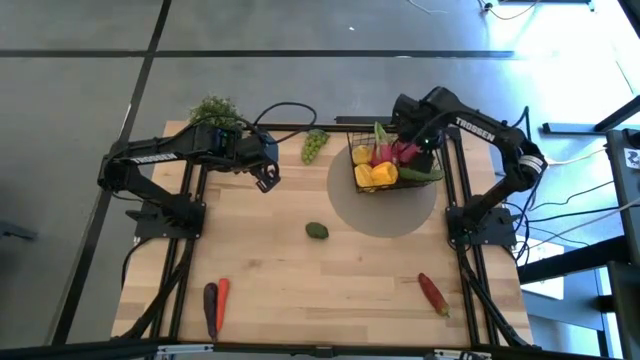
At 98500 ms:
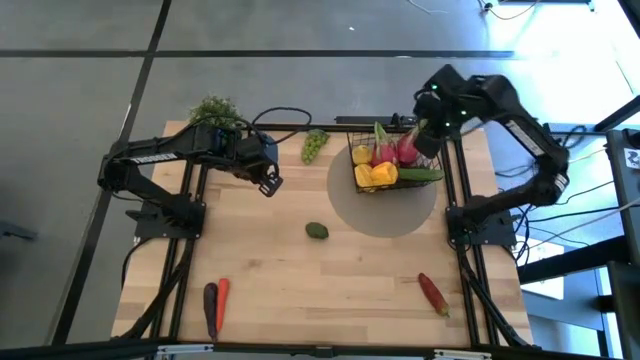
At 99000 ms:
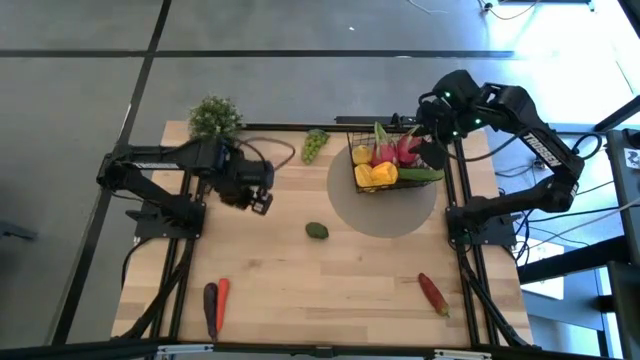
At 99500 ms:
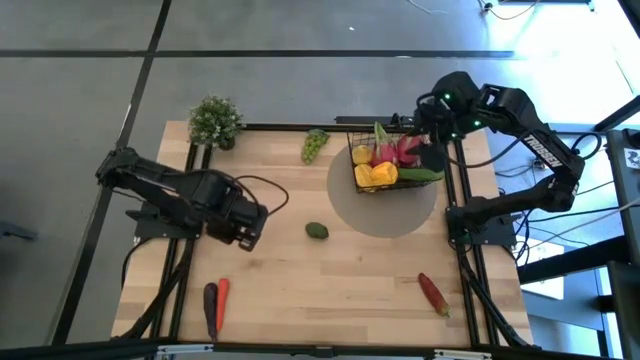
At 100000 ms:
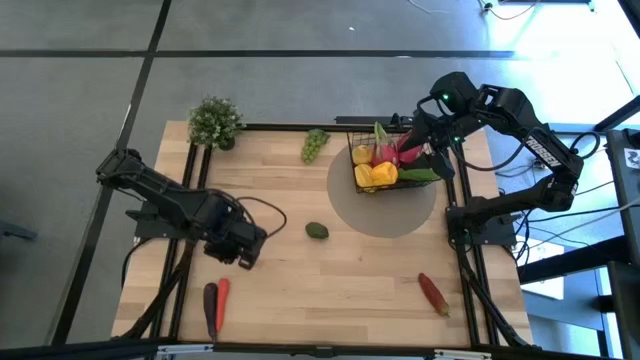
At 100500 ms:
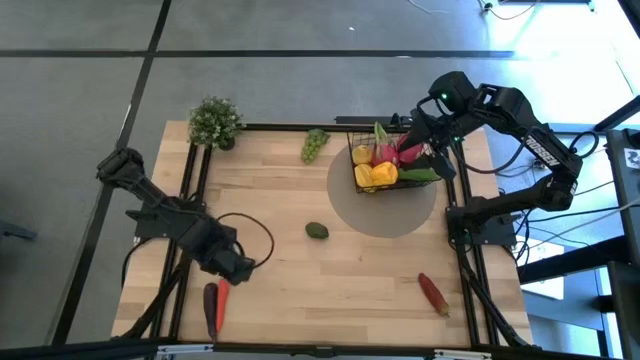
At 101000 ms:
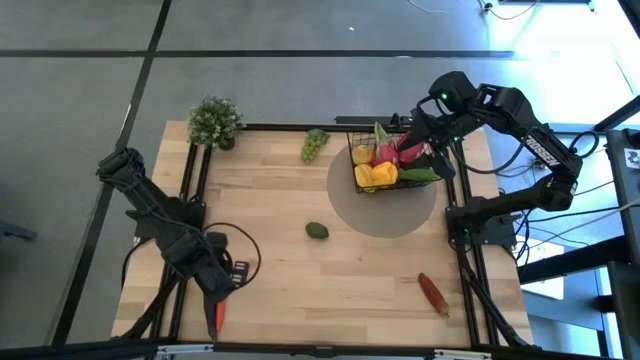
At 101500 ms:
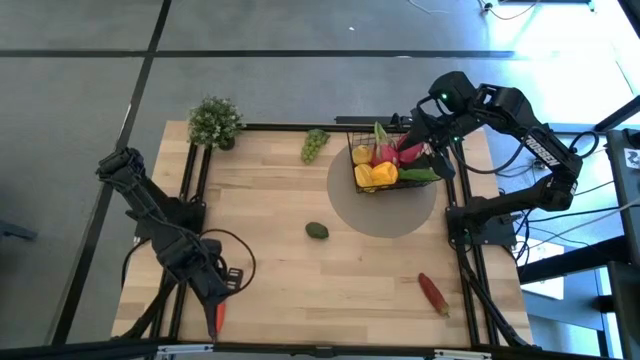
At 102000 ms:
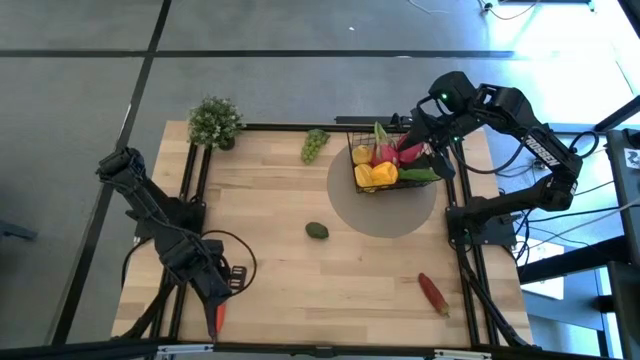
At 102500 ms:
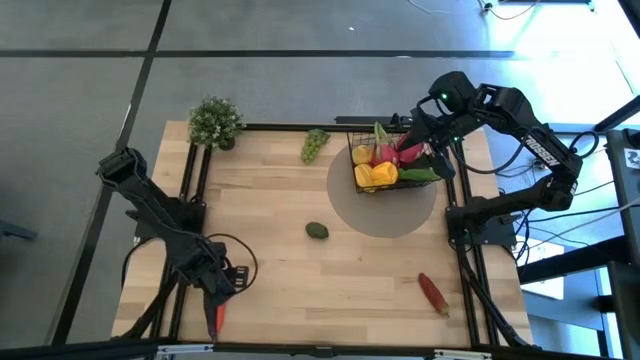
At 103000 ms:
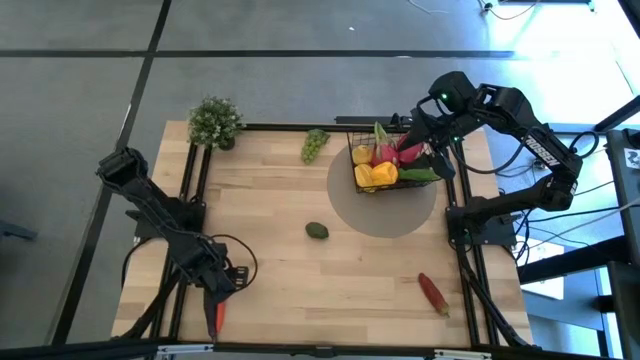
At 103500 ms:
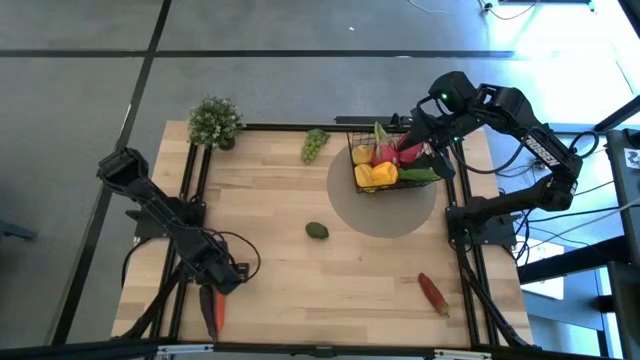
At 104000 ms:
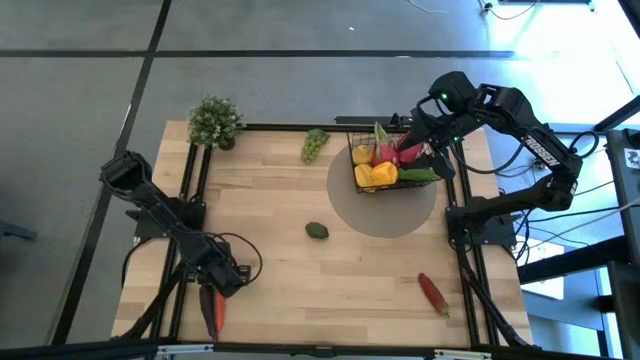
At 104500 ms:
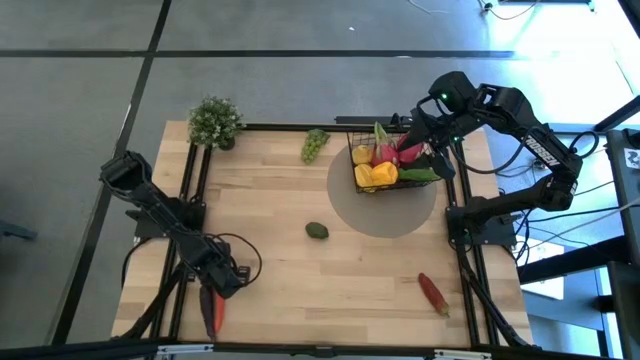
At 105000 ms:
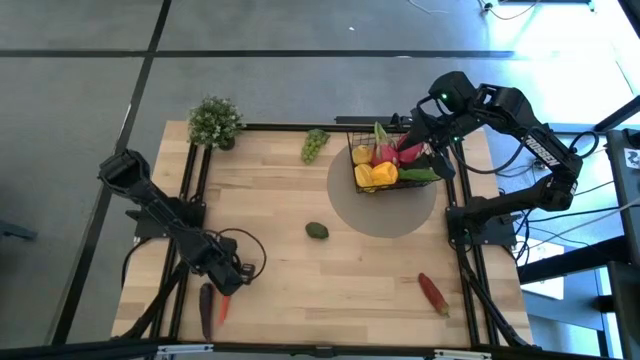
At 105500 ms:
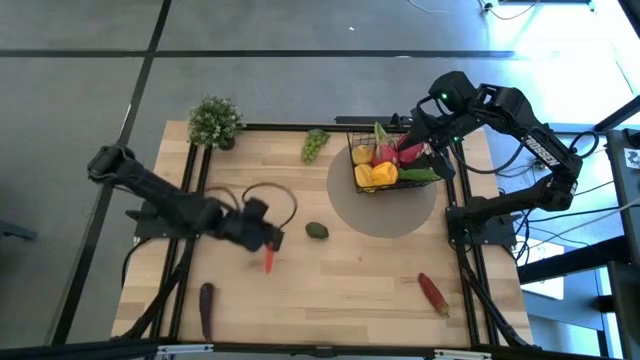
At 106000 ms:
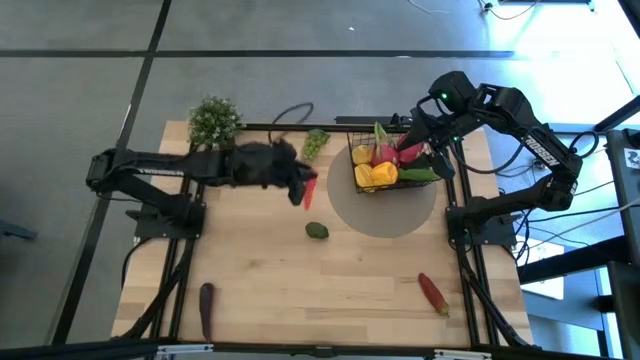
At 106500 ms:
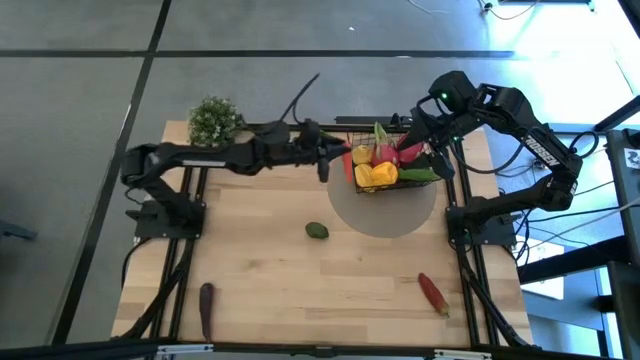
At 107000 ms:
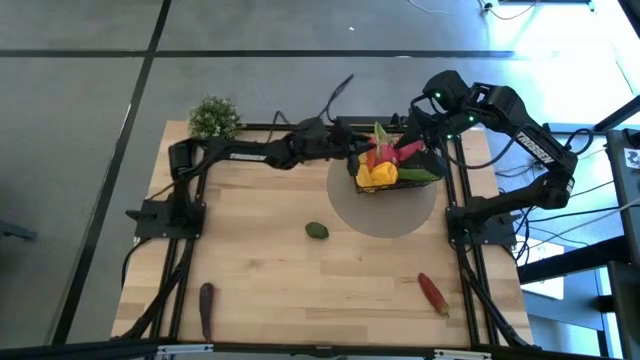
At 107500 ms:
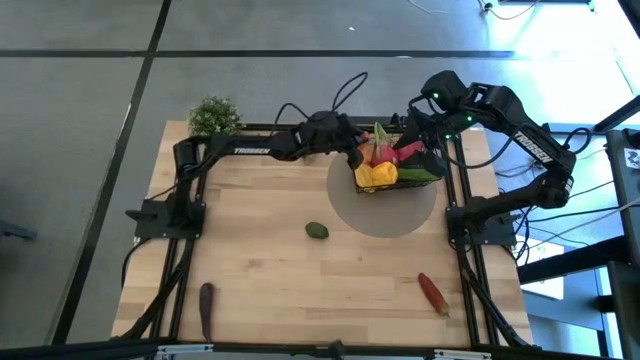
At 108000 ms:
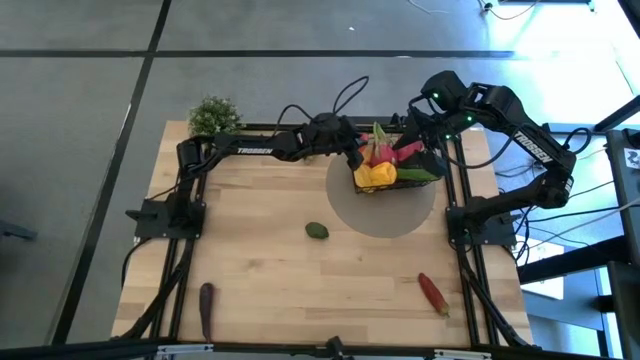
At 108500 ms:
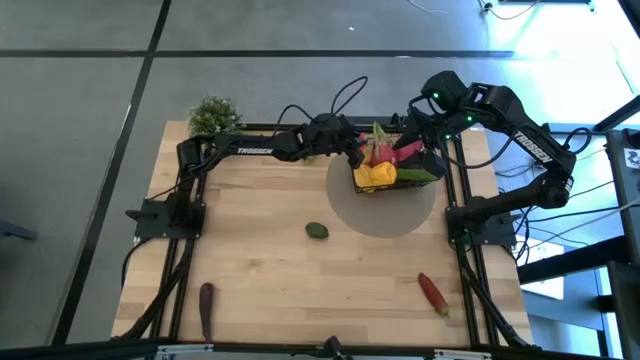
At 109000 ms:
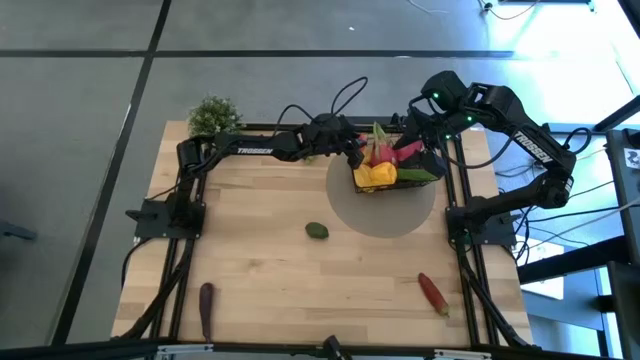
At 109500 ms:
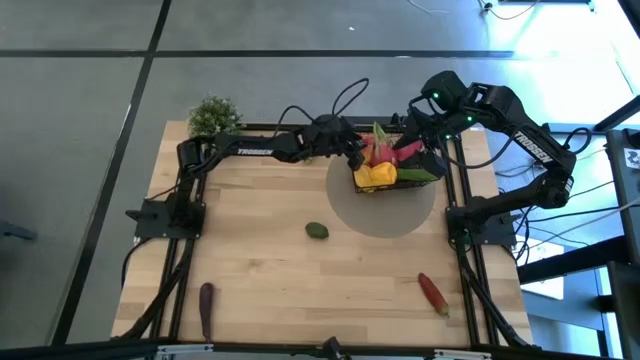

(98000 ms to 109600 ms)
Task: Build produce basket
Put the carrot into the wire basket

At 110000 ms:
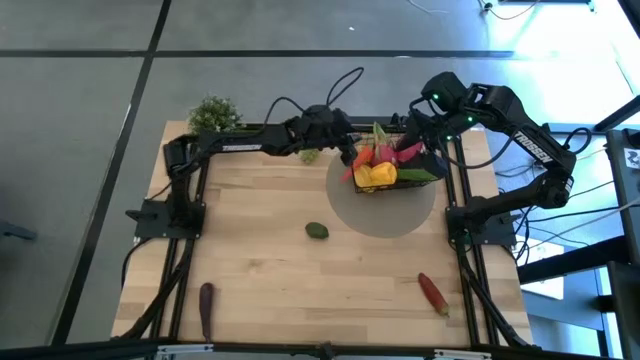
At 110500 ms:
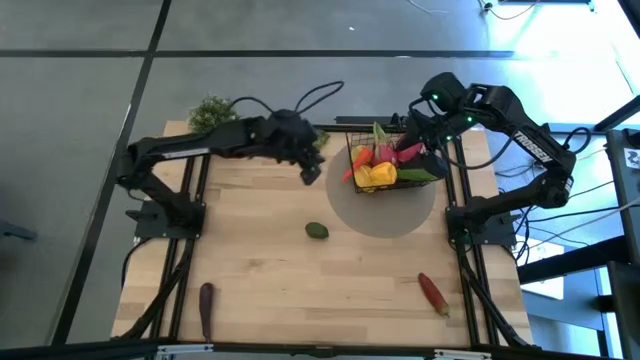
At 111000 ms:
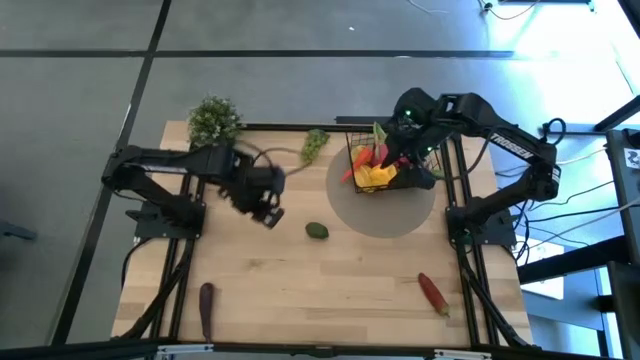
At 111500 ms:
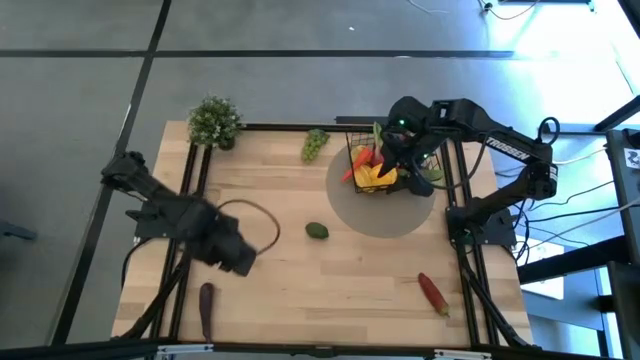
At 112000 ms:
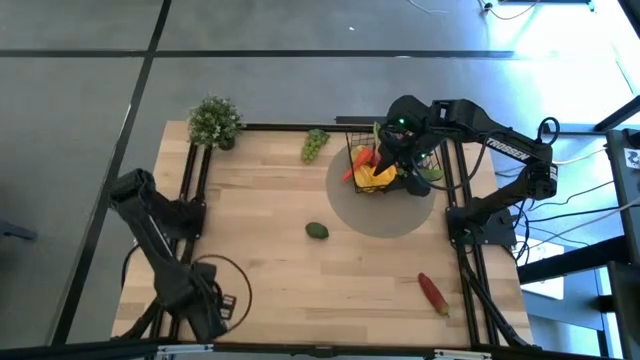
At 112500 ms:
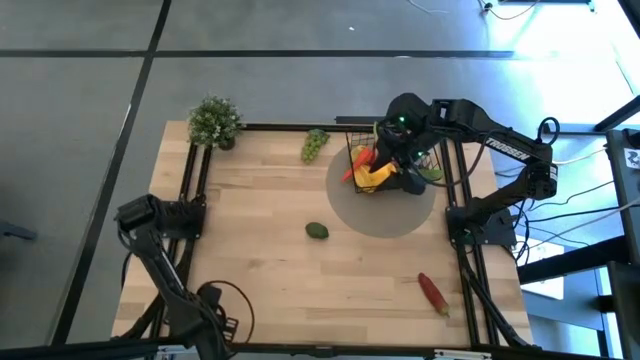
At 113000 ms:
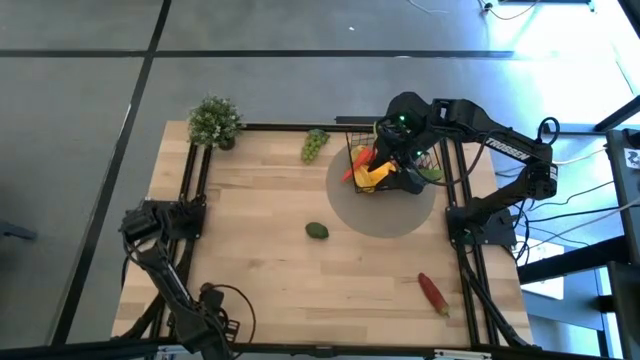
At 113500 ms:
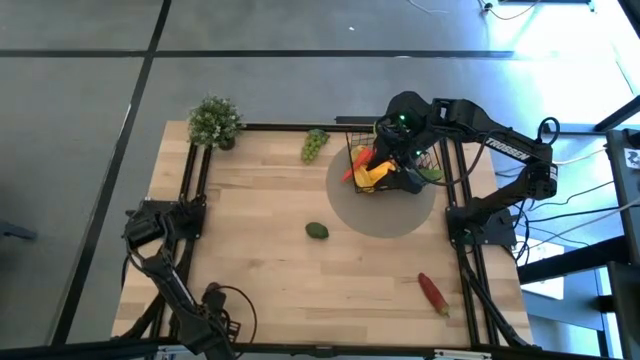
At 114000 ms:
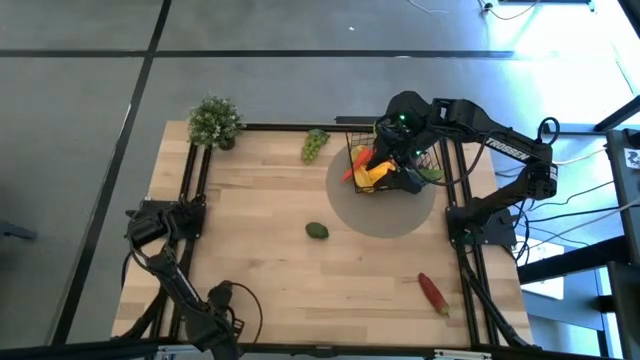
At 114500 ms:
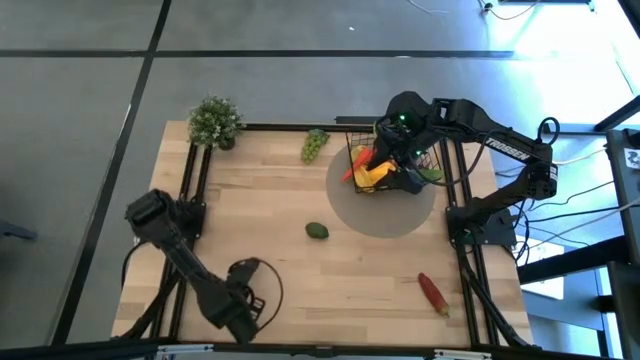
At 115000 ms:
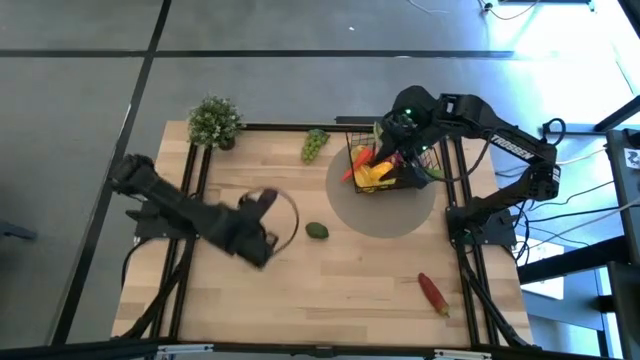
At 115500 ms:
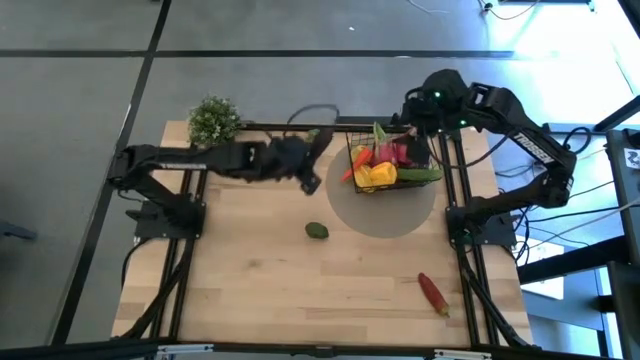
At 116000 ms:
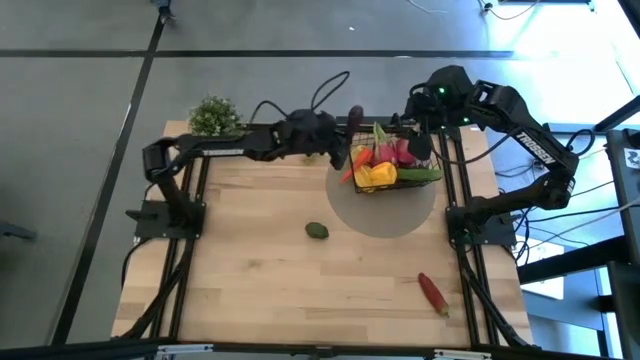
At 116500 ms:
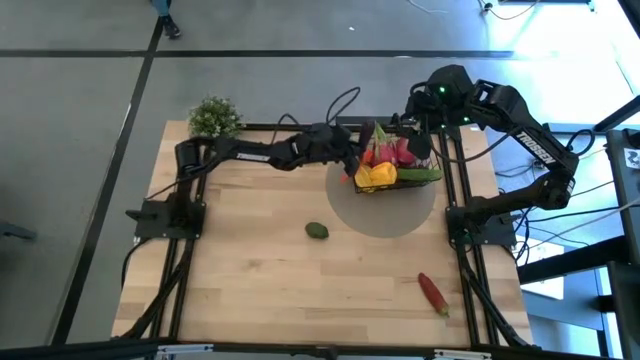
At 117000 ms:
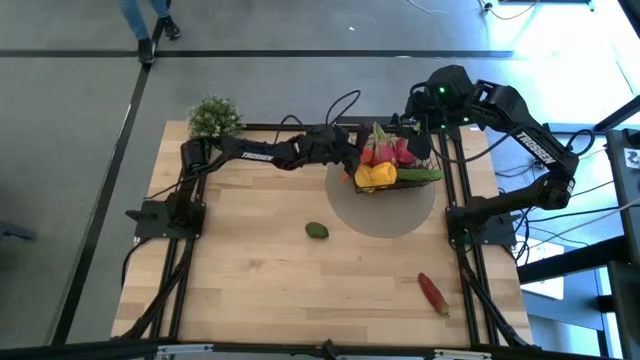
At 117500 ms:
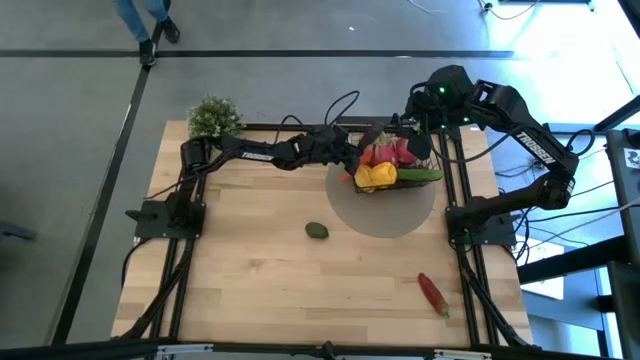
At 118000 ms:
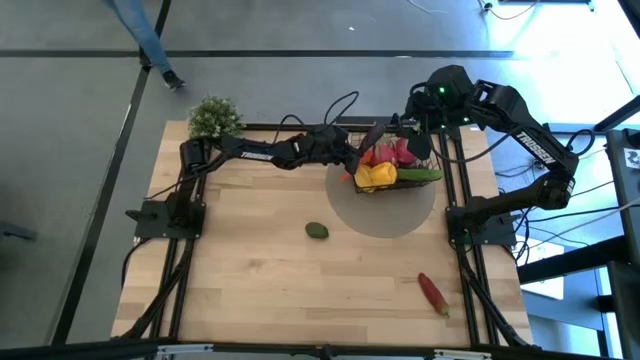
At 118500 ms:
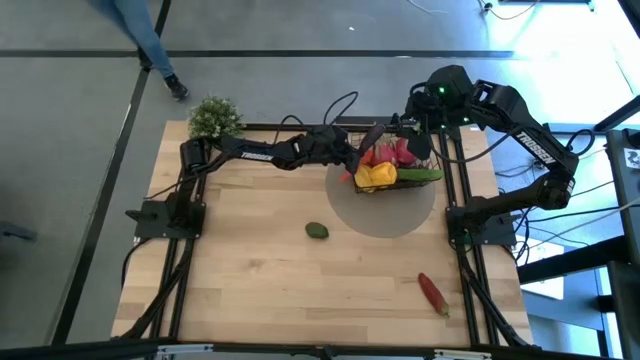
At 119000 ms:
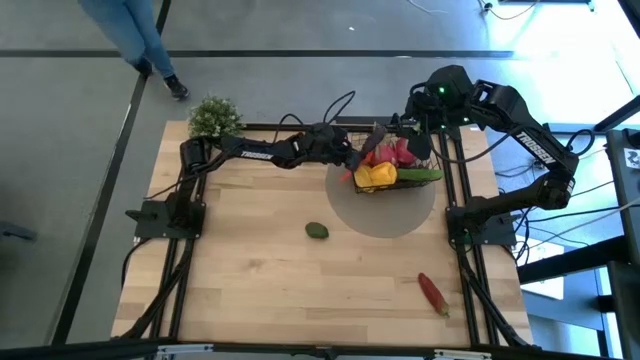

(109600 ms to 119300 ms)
Put the eggplant into the wire basket
